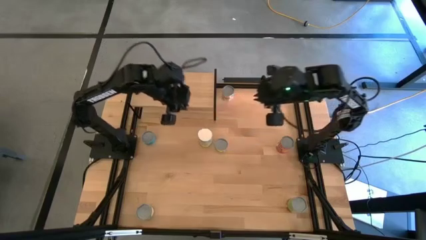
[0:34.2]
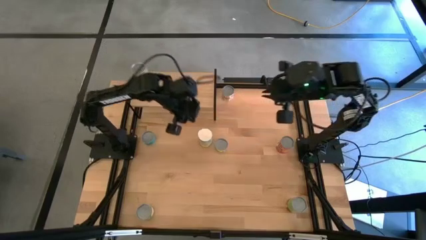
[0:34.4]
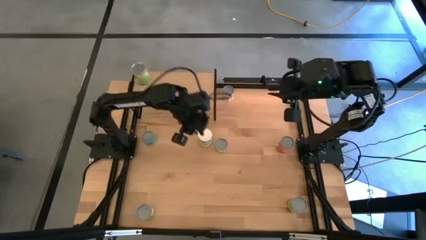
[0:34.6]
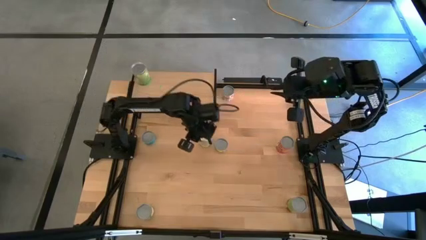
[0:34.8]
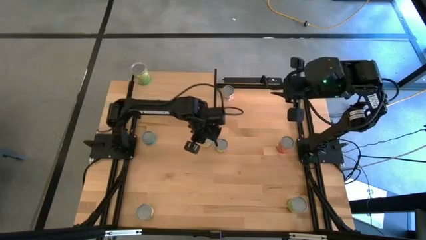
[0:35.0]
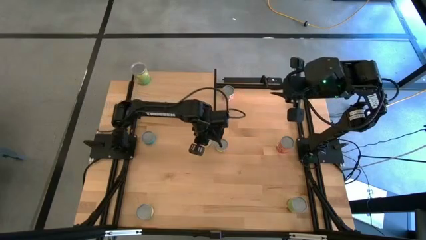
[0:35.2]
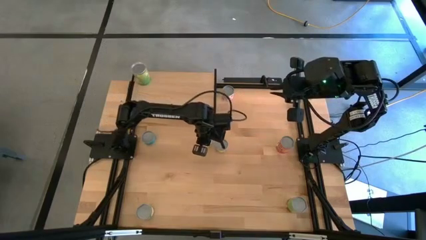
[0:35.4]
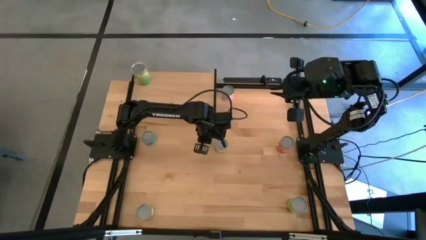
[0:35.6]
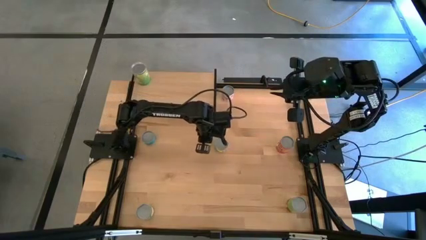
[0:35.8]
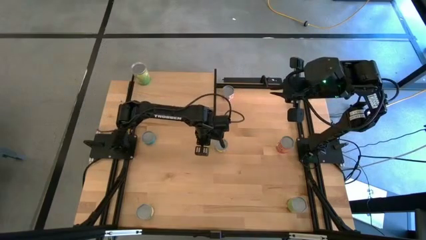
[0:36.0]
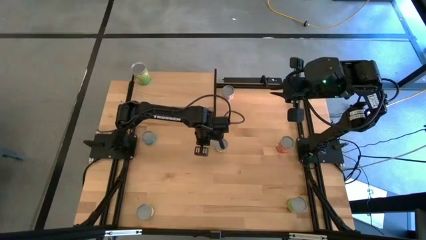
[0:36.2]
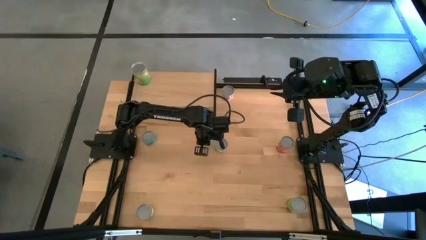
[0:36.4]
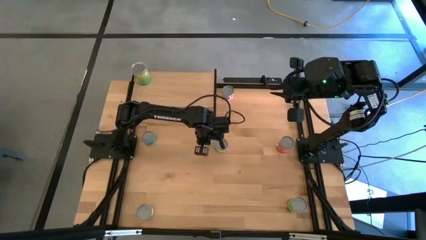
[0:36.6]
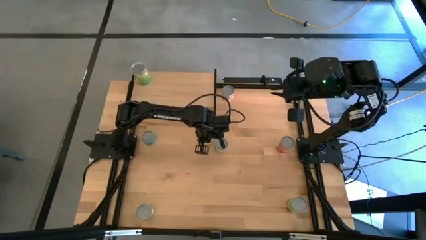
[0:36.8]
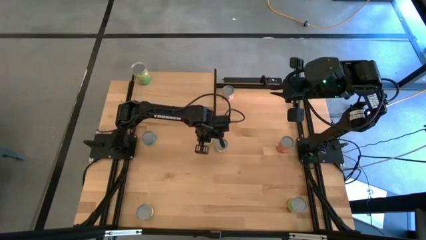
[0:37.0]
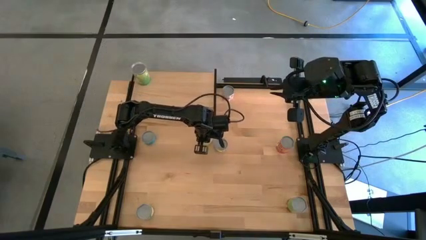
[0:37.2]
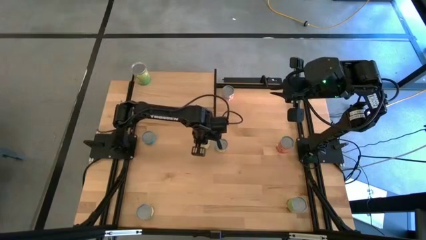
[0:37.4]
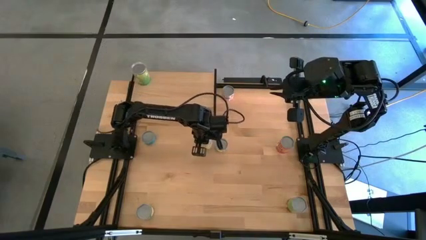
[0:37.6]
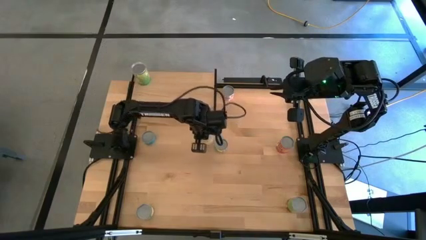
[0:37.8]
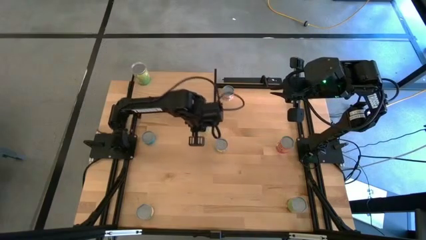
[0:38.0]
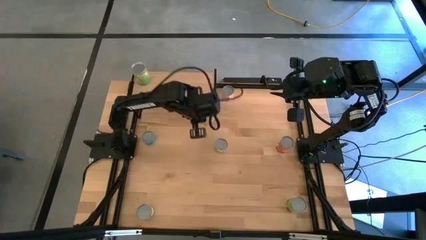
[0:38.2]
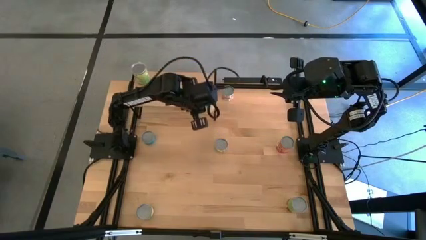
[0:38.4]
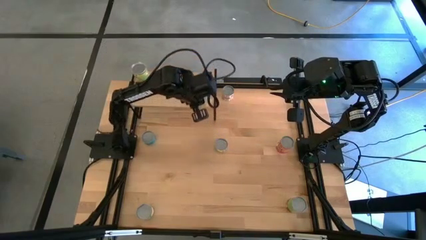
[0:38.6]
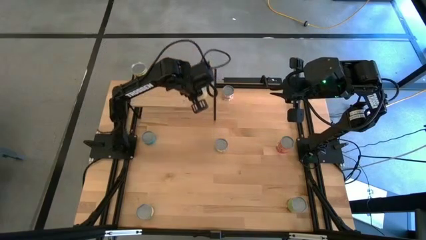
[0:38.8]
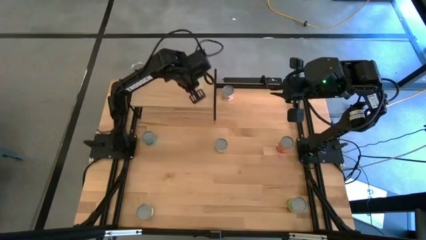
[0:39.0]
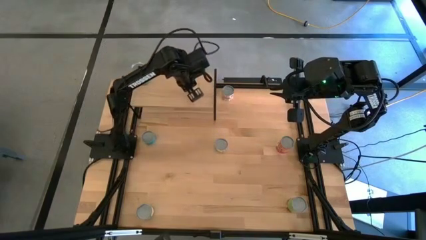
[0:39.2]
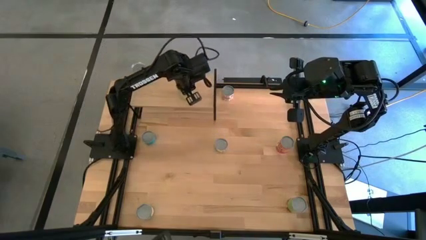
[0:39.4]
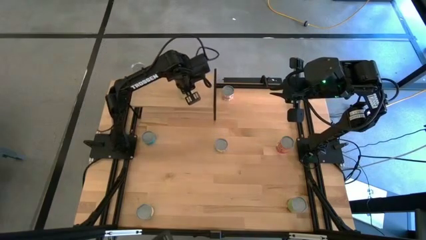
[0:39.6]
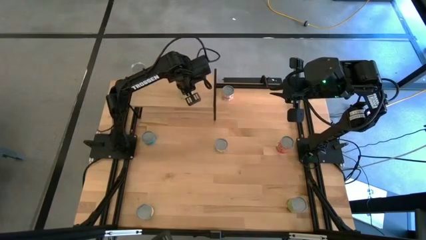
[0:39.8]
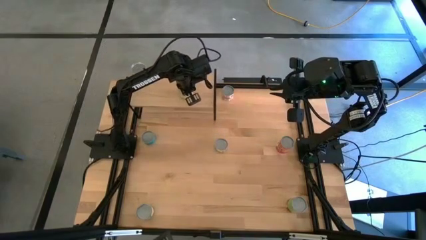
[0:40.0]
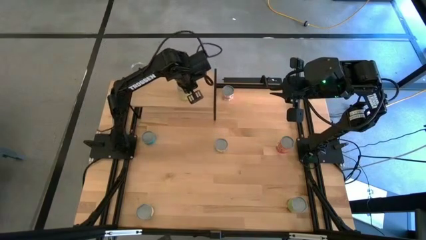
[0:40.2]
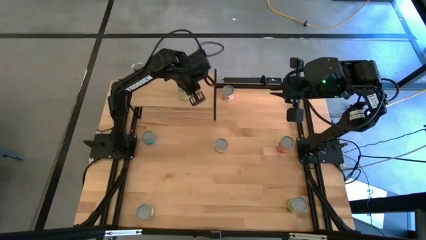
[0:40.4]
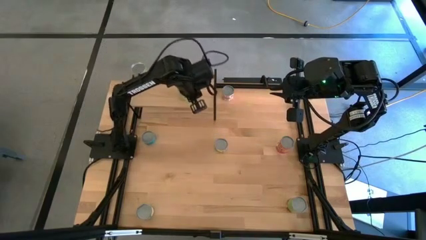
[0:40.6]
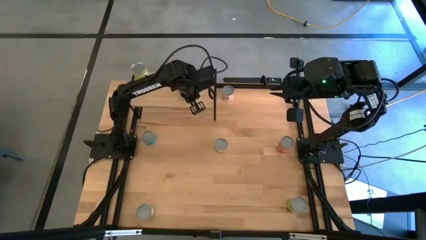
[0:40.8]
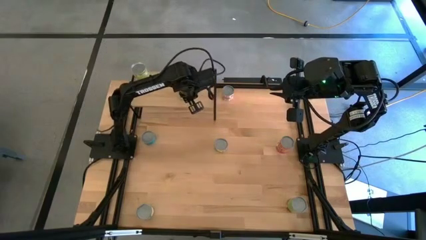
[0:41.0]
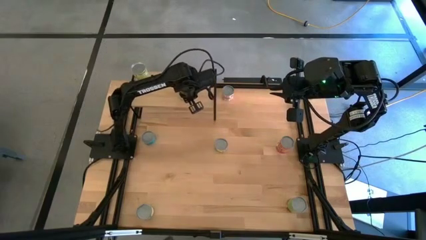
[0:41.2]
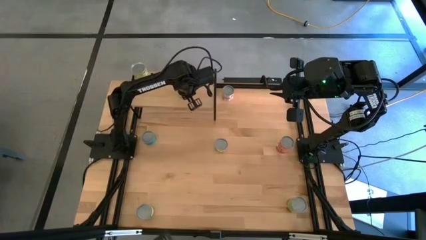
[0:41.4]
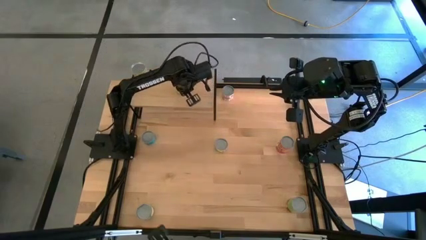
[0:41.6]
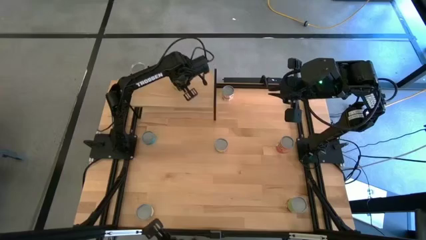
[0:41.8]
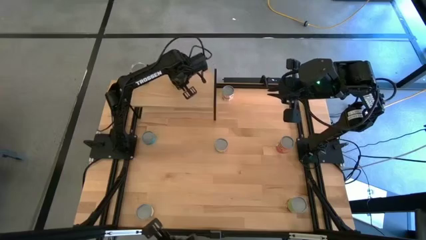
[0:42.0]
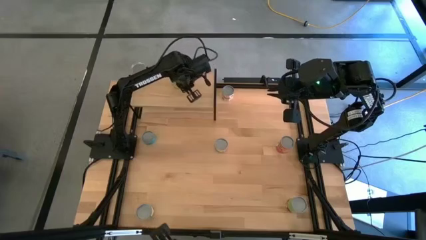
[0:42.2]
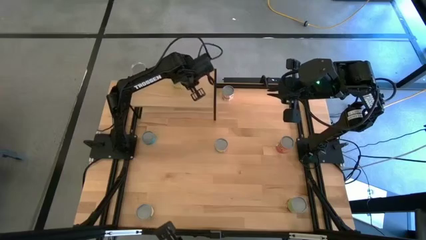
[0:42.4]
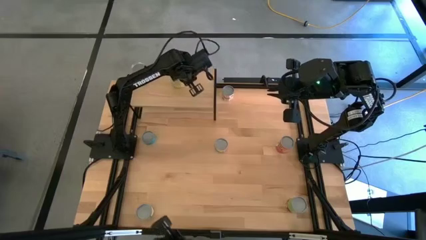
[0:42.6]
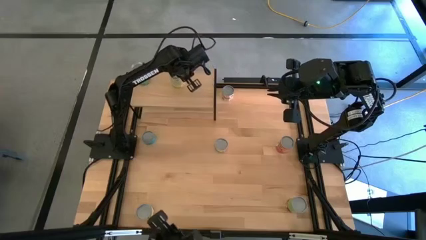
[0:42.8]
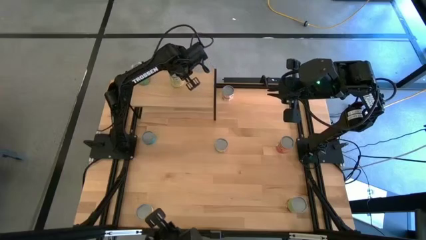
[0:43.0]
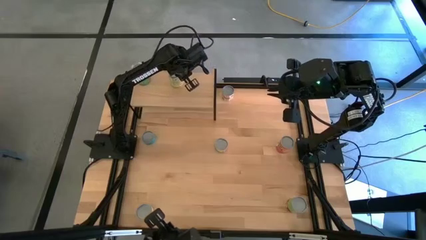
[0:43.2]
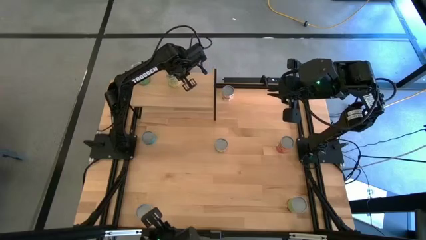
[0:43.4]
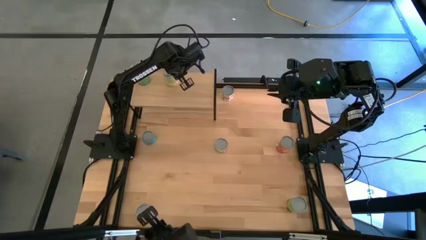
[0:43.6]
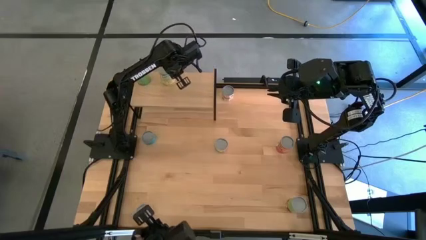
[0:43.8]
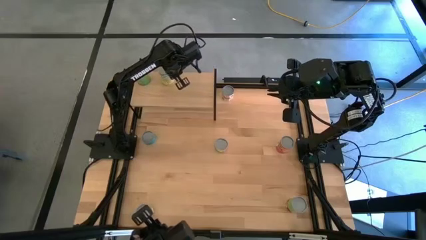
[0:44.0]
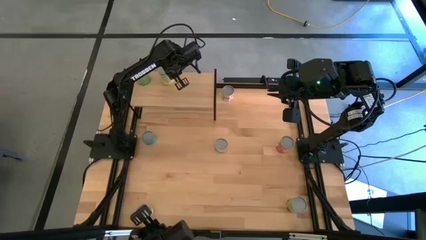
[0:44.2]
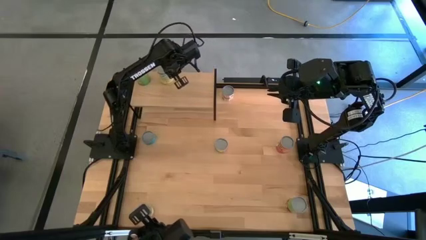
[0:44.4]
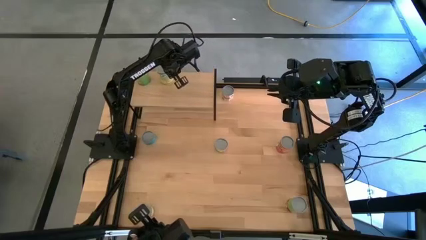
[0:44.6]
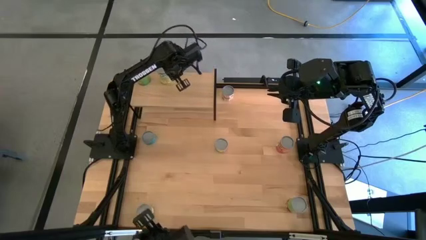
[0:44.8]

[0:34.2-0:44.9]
Task: Pick and place cans onto a shelf
Put the canned carrots on the shelf

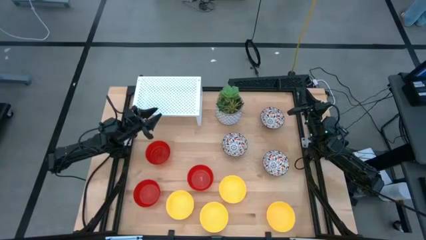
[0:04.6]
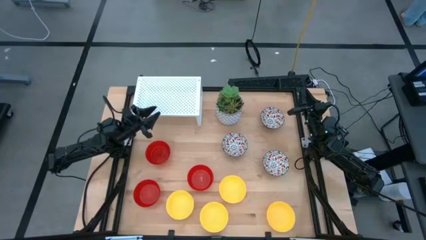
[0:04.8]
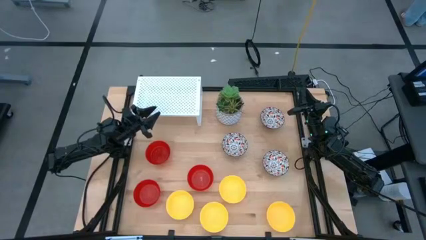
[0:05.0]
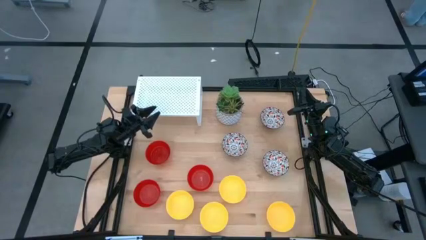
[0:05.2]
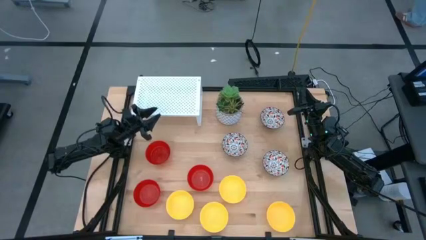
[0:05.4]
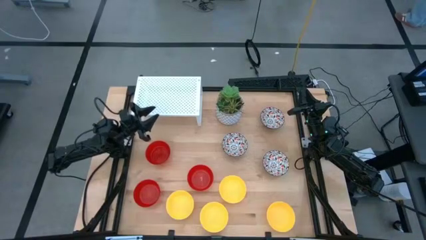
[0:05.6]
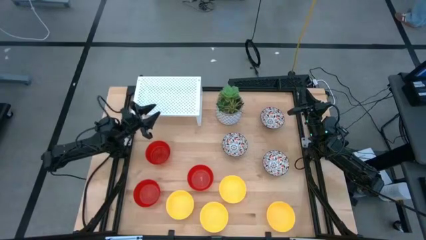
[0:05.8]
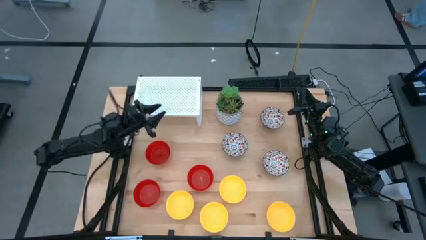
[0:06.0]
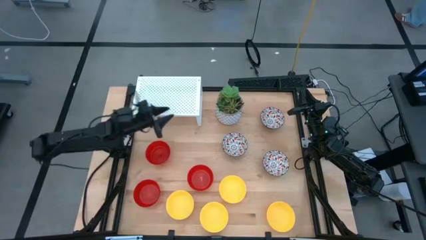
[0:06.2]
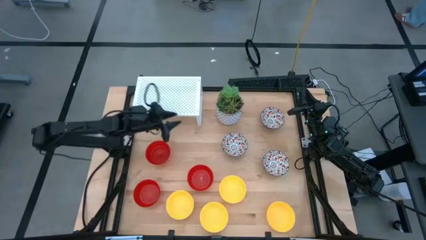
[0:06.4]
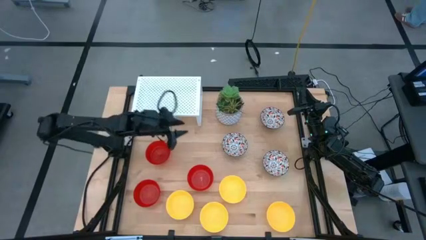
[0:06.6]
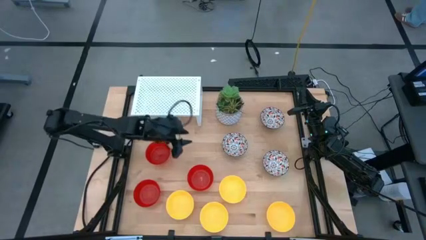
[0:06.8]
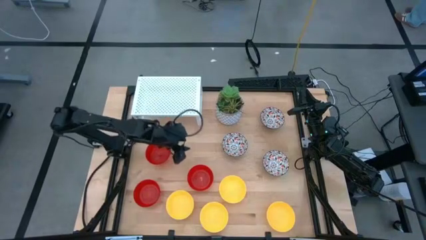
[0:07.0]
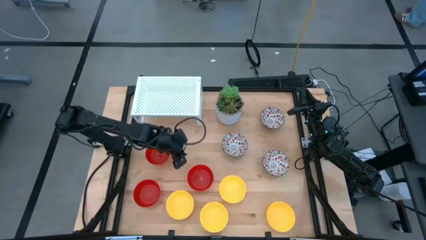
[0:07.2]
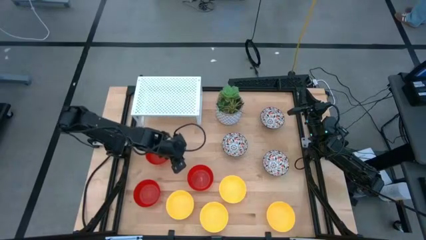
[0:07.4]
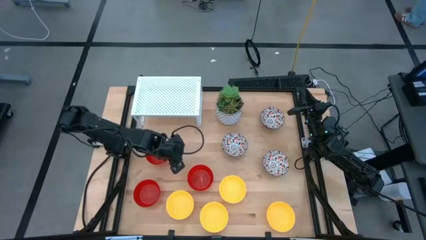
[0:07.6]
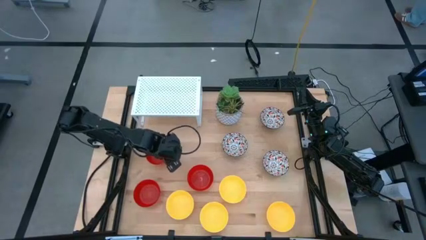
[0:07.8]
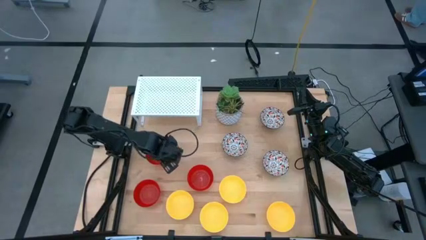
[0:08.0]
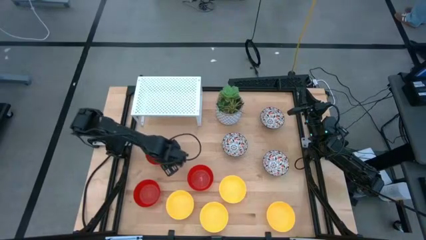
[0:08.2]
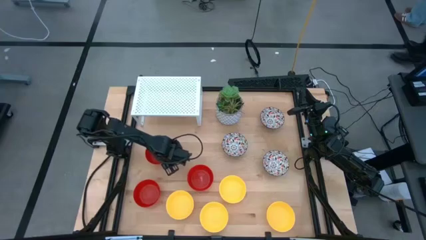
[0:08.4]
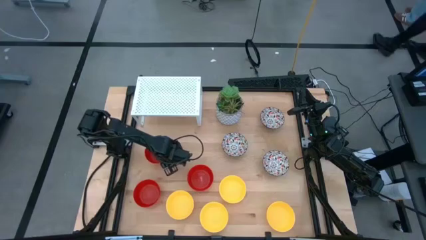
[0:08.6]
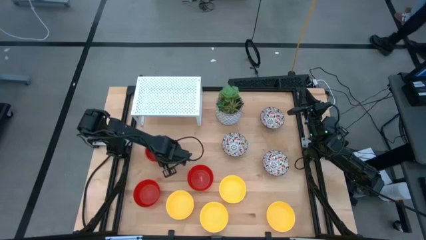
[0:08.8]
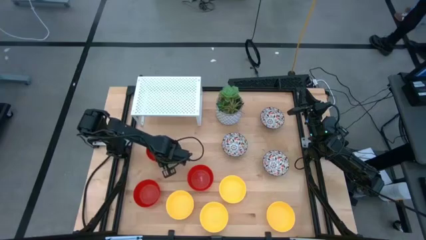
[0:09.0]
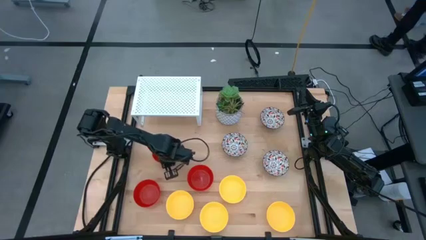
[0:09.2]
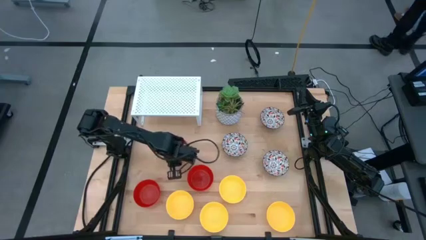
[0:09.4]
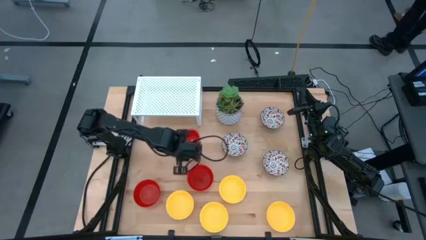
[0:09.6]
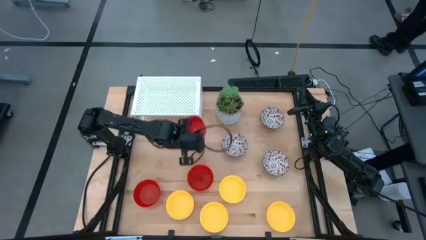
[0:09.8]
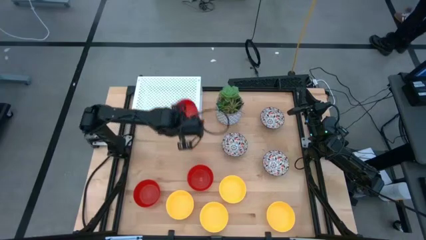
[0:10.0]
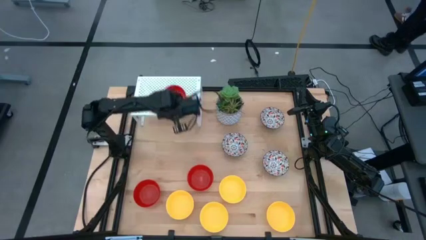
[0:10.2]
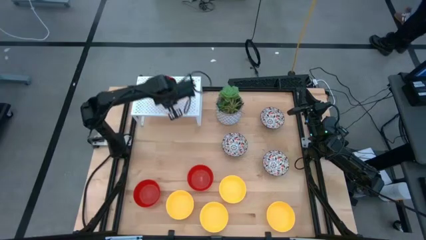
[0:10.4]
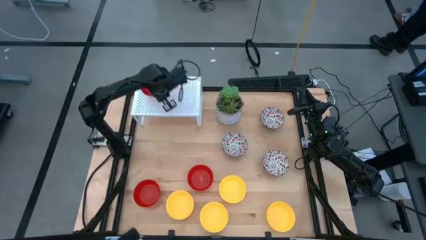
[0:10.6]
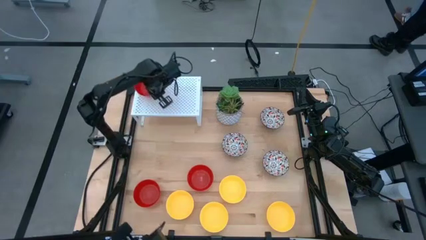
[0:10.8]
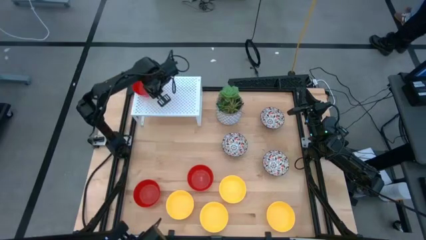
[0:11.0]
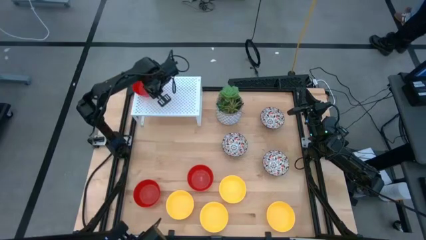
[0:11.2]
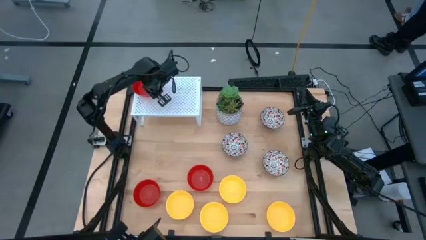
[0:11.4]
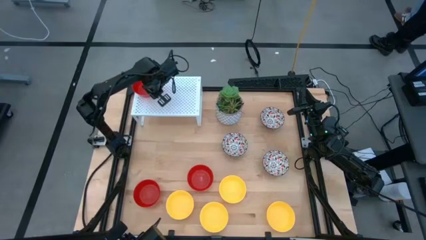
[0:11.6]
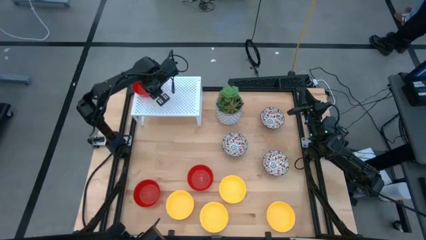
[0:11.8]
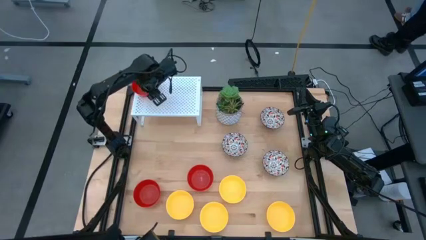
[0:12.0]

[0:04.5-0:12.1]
Task: Pick & Place Mini bowls
Put the red bowl on the shelf
